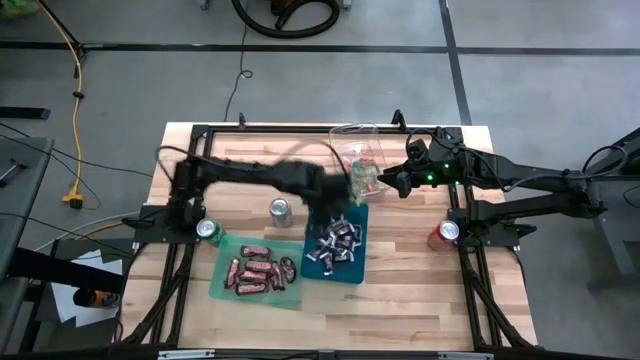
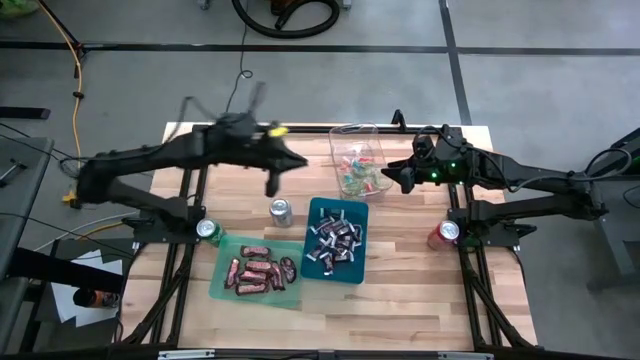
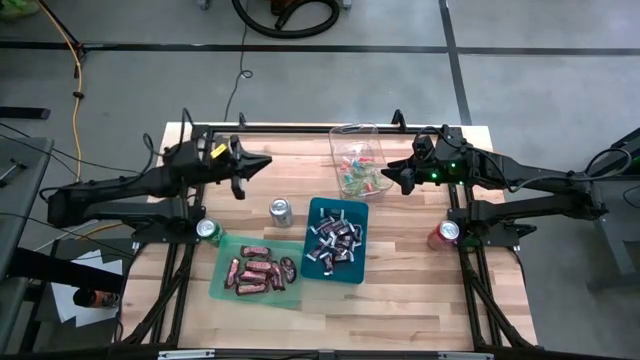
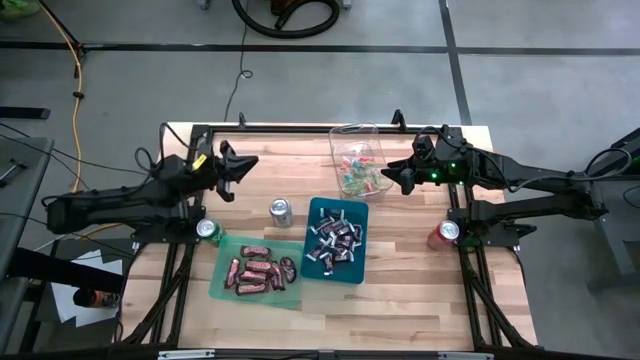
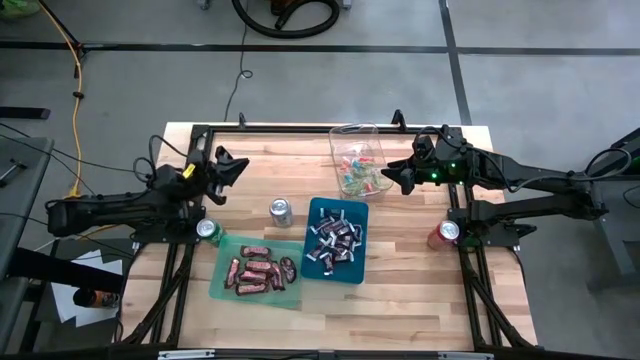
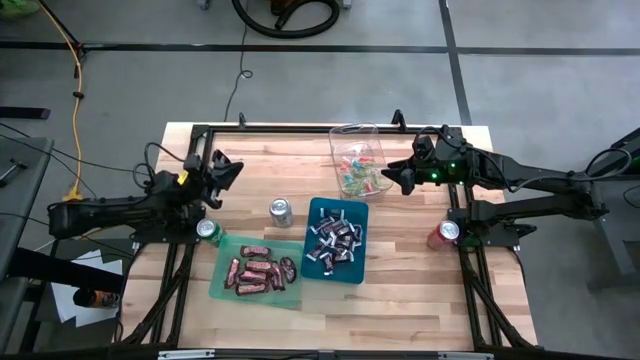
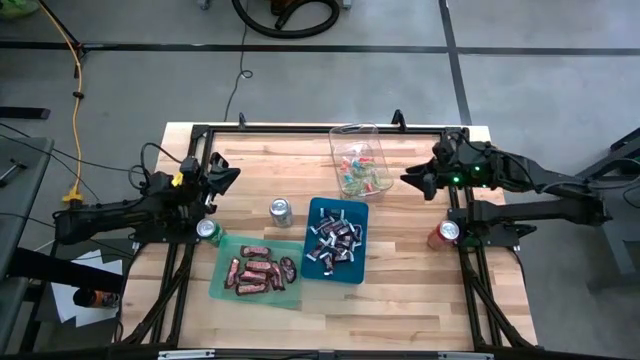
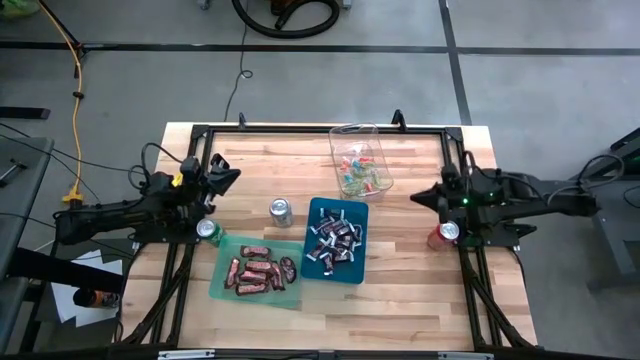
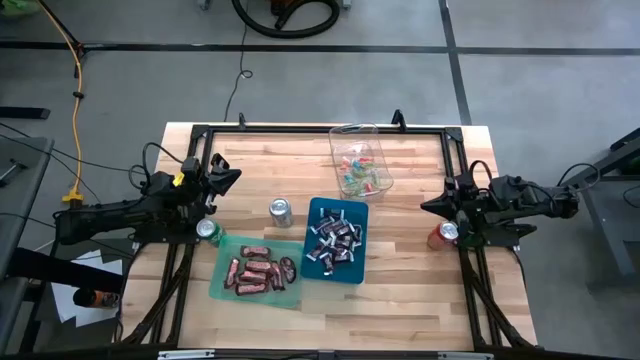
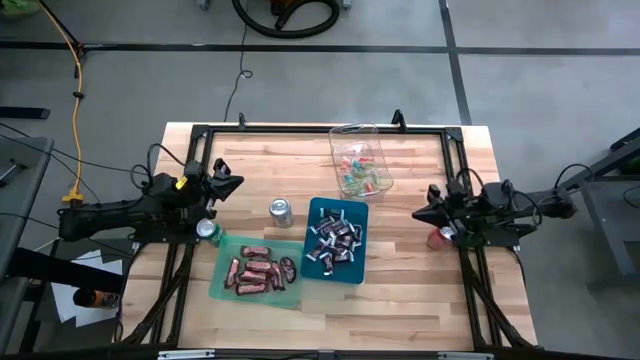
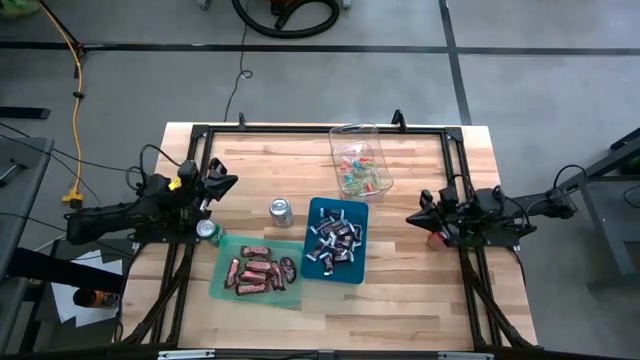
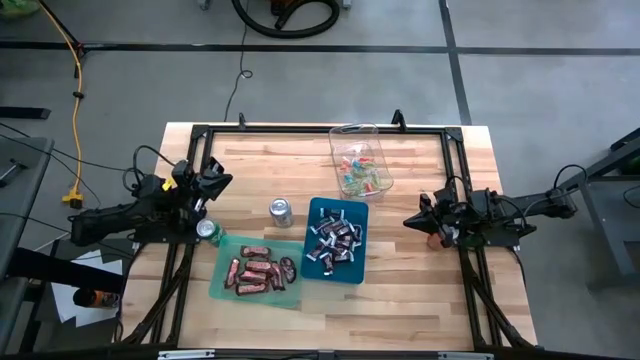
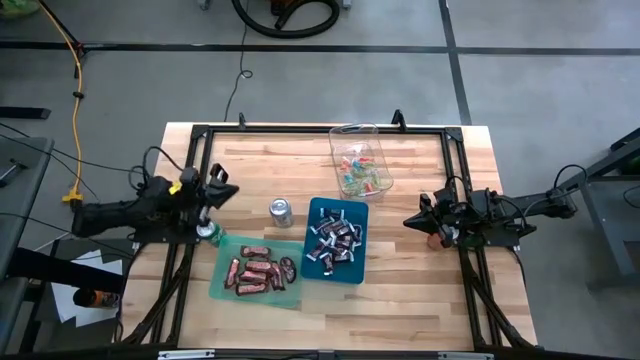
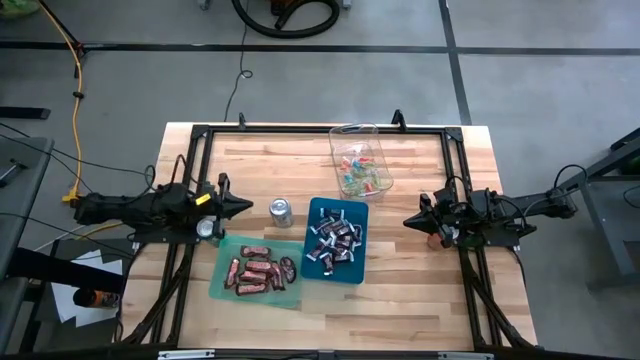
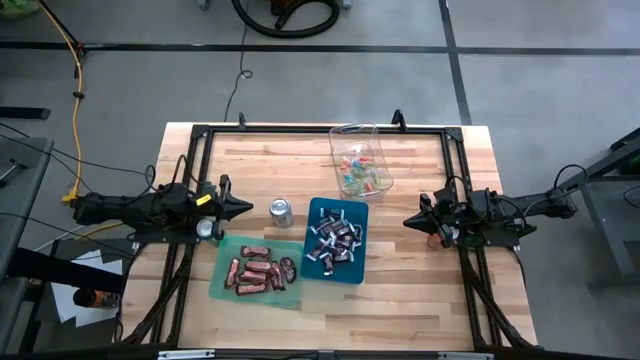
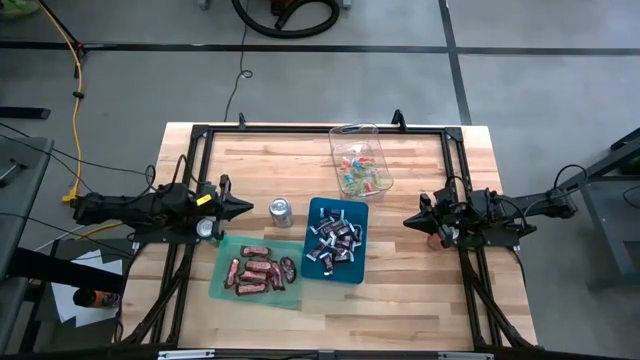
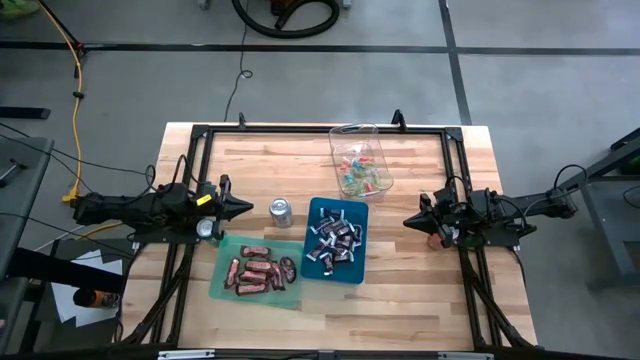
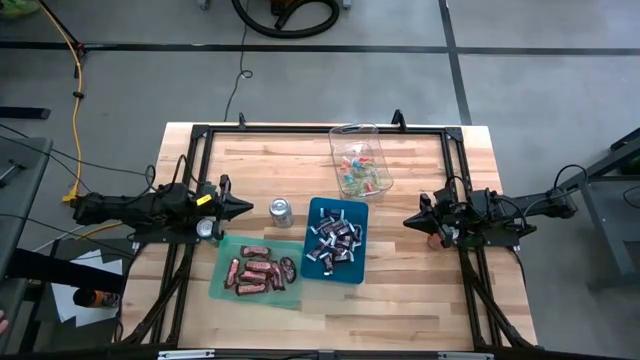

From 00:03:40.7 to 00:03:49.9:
Task: Sort candy
Return to Home Position

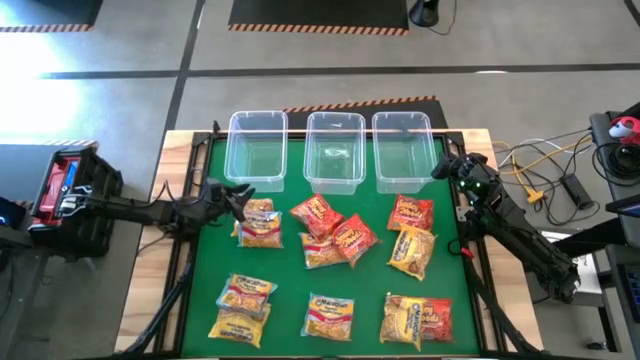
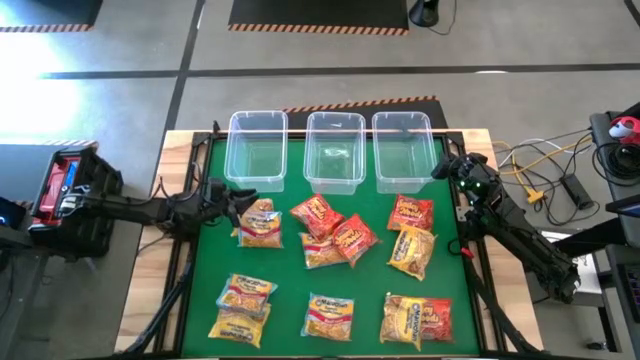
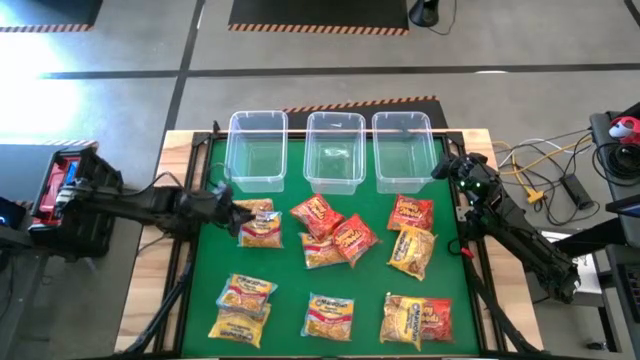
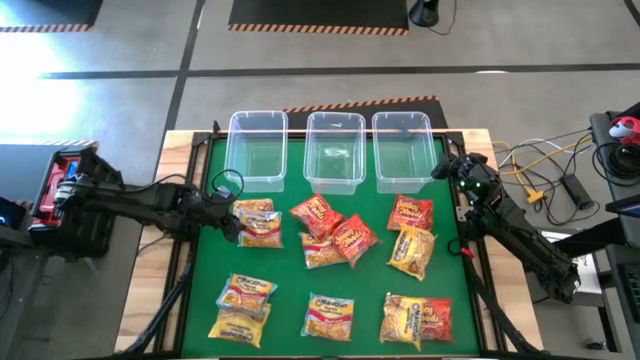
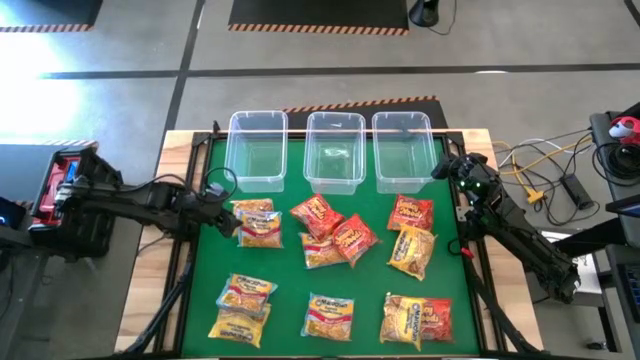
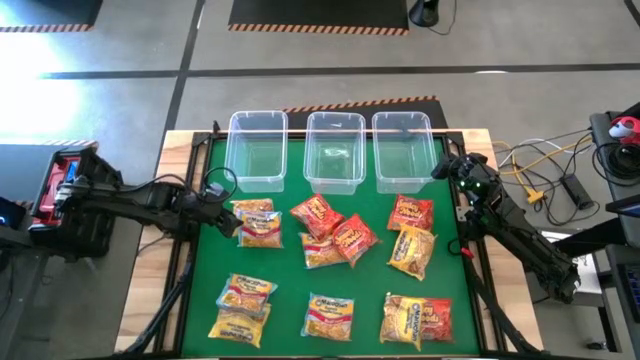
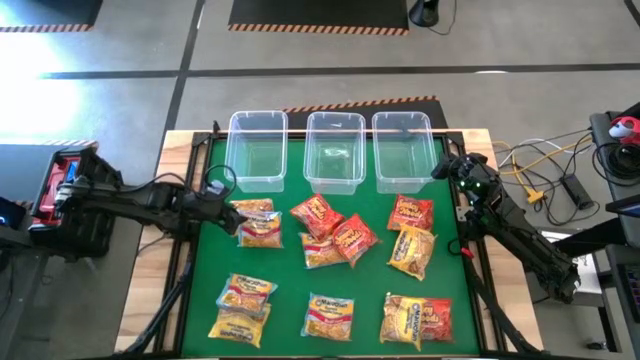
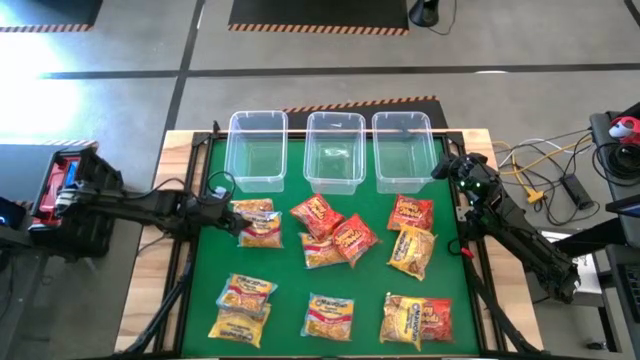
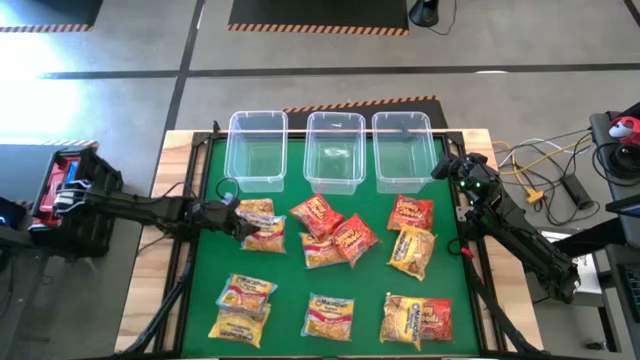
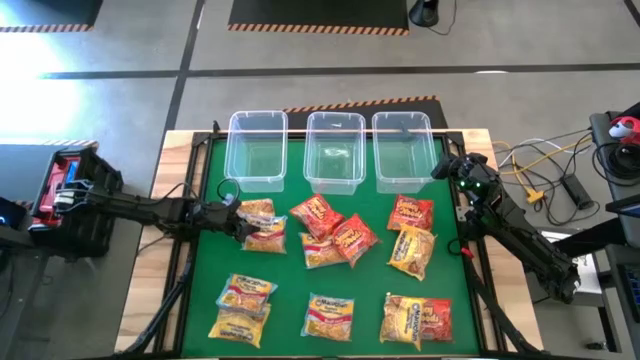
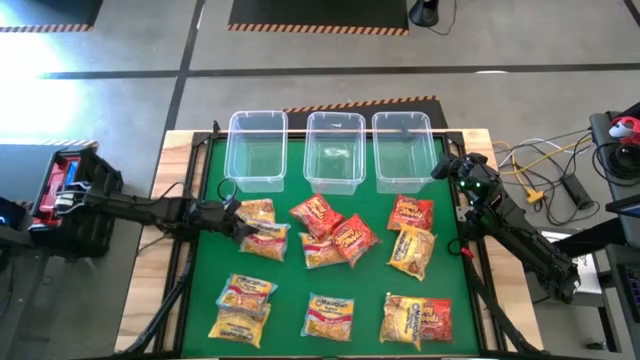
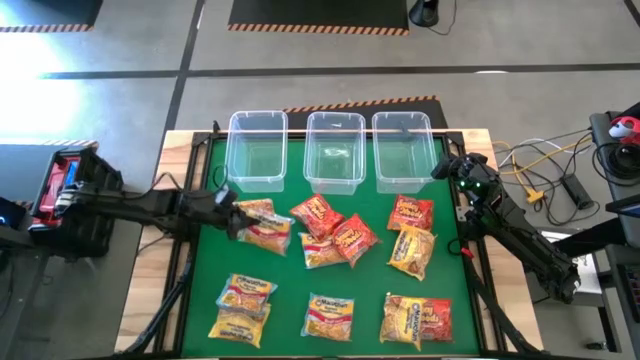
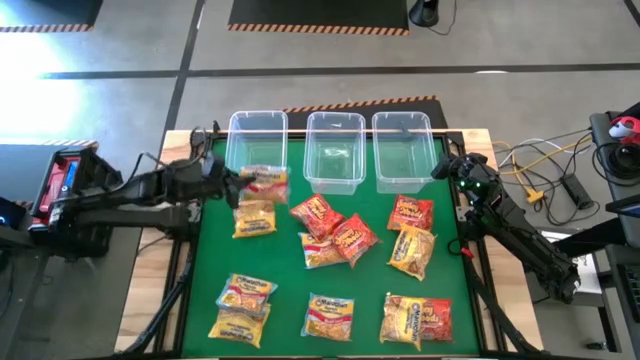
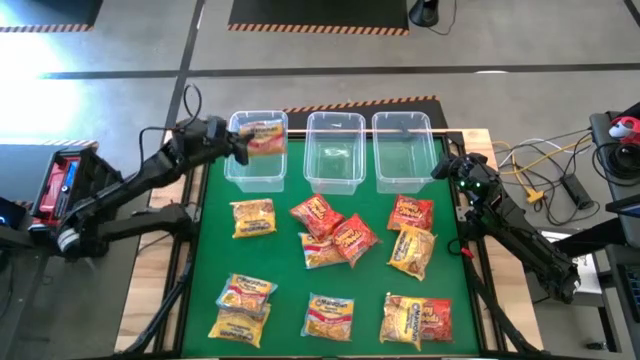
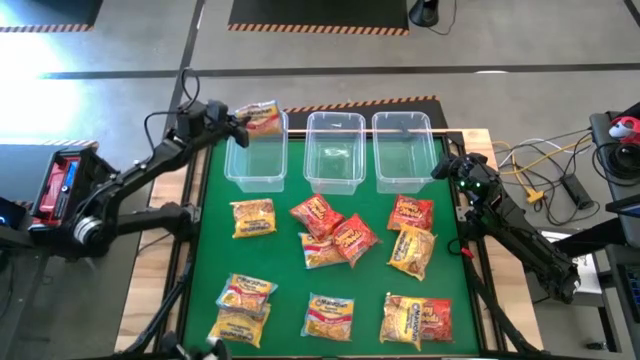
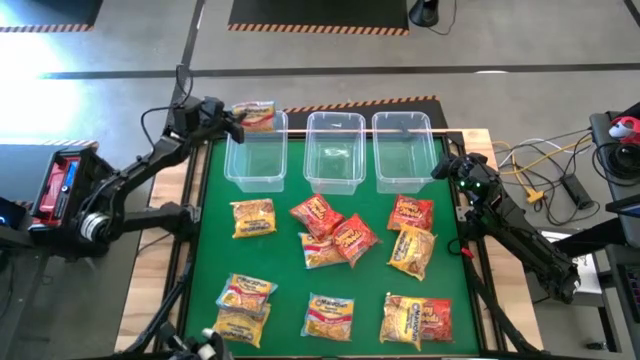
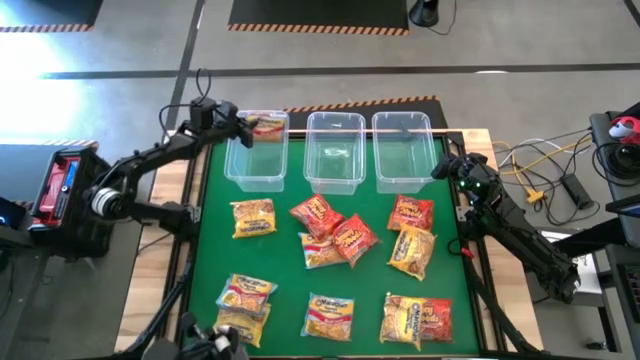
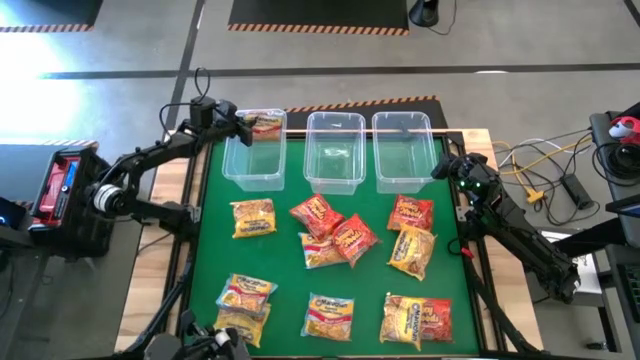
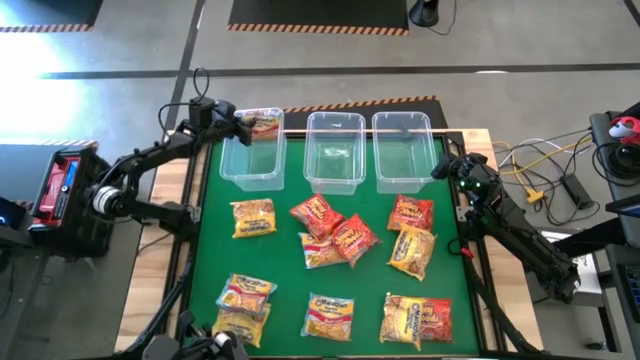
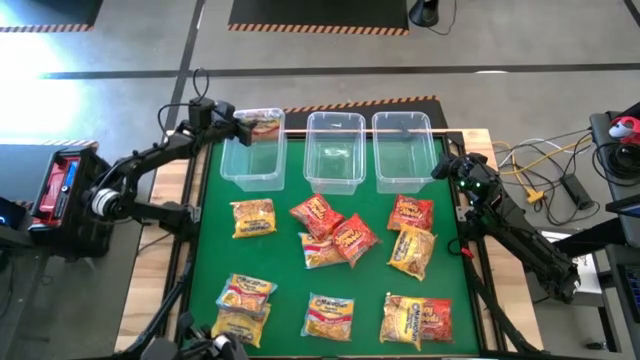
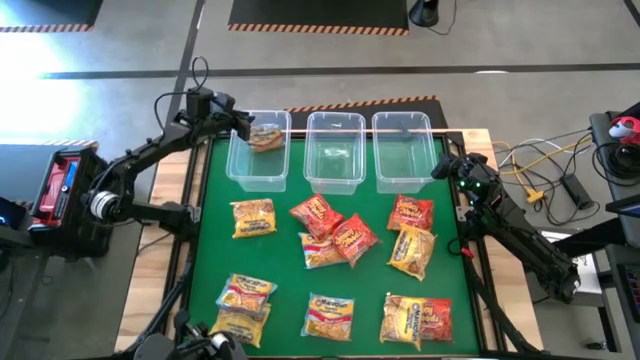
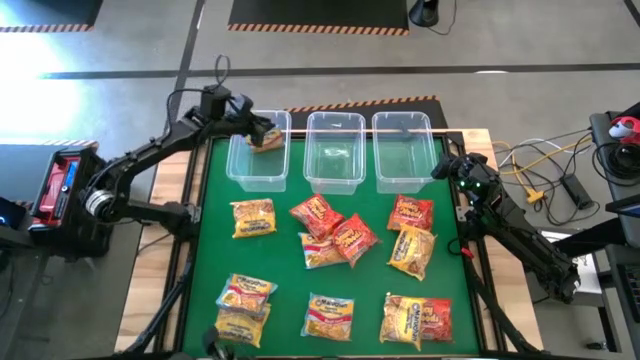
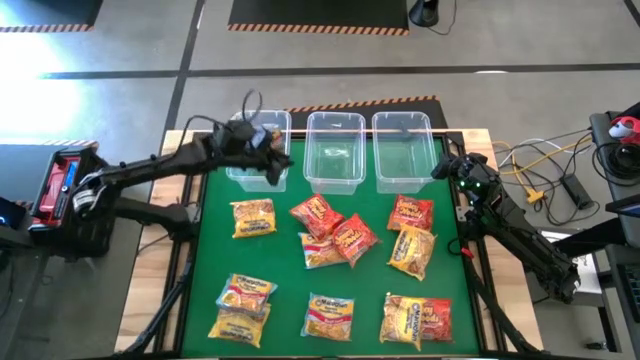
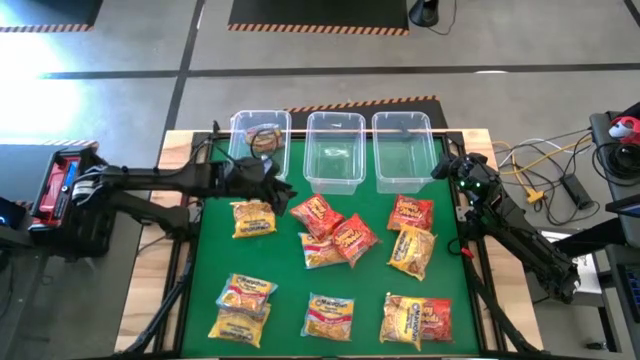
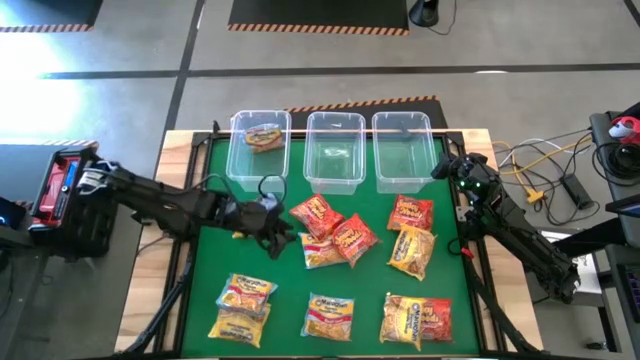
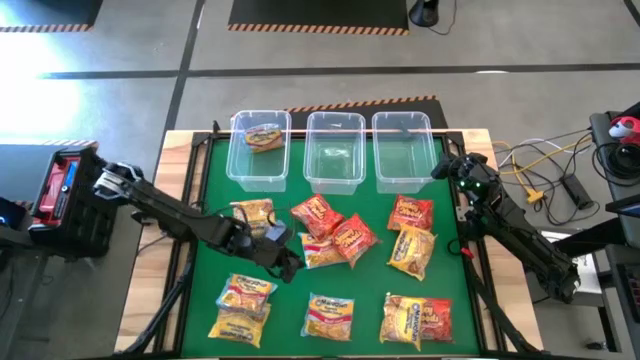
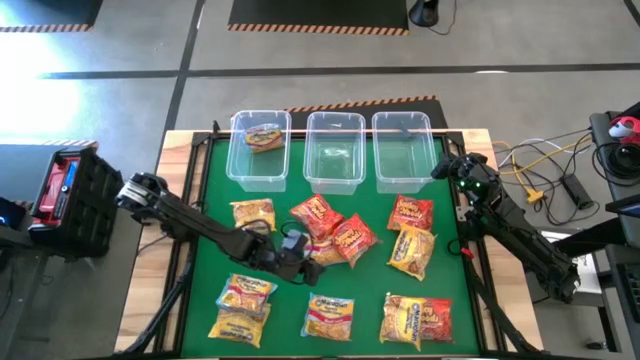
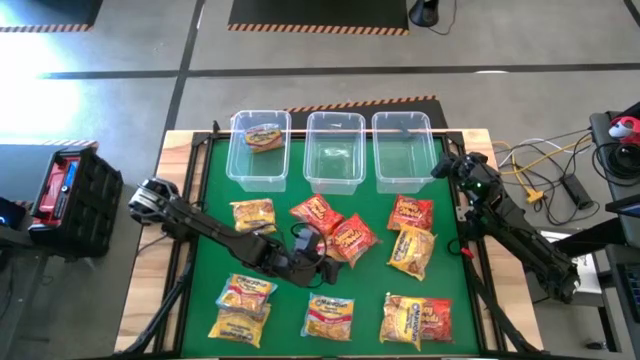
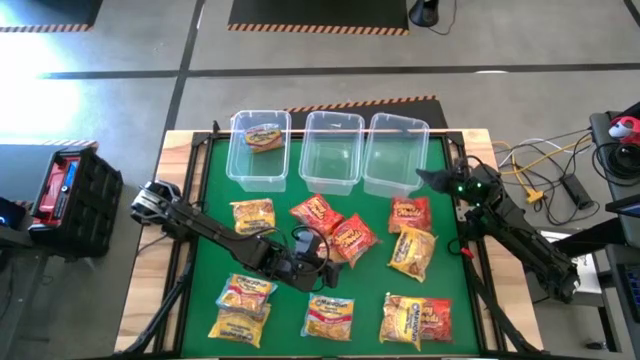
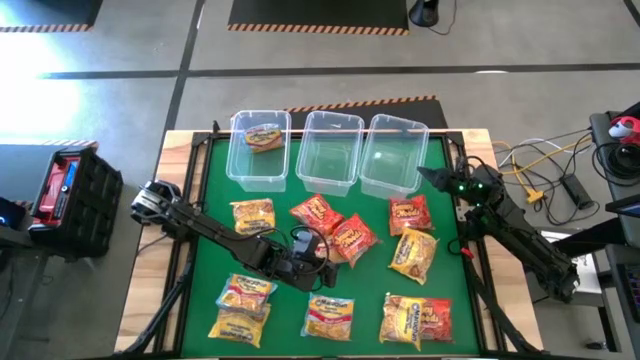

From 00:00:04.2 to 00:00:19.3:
Task: Sort Maruchan noodles
Put the top left blue noodle pack into the top left transparent bin
